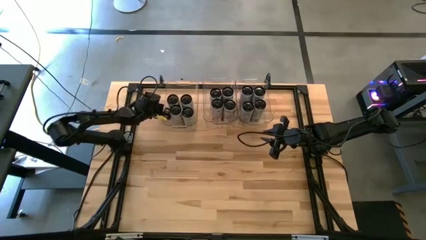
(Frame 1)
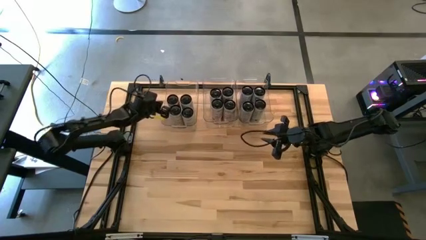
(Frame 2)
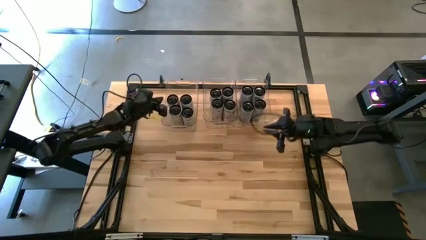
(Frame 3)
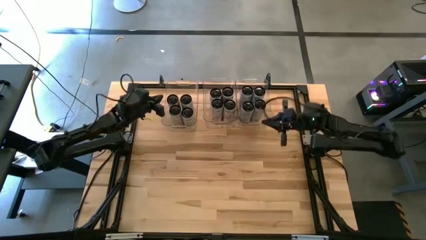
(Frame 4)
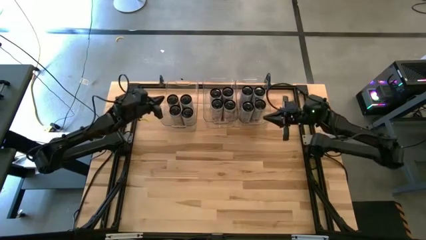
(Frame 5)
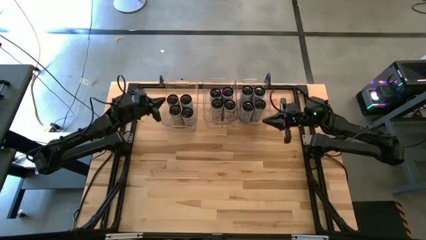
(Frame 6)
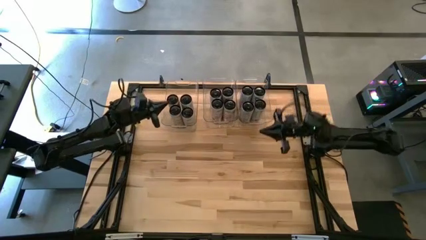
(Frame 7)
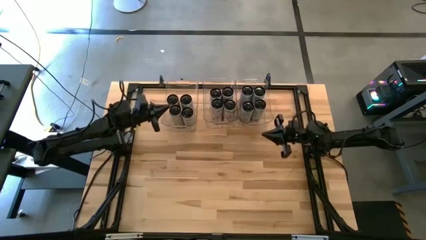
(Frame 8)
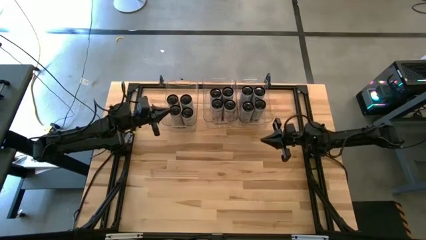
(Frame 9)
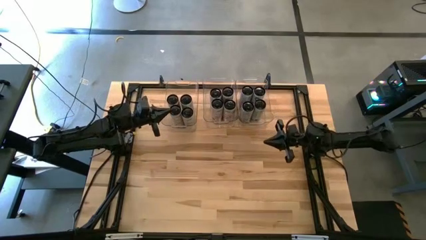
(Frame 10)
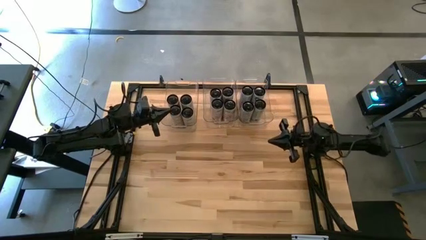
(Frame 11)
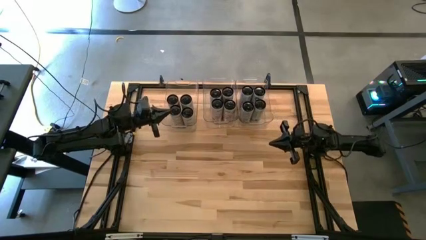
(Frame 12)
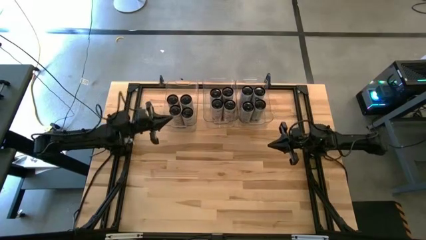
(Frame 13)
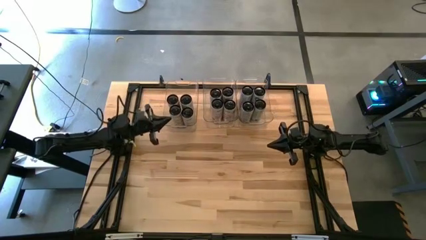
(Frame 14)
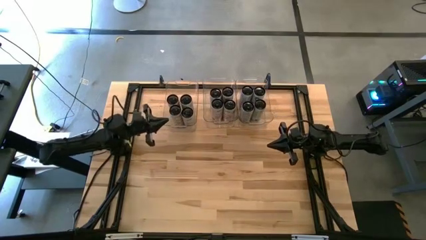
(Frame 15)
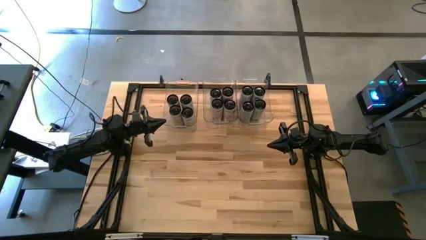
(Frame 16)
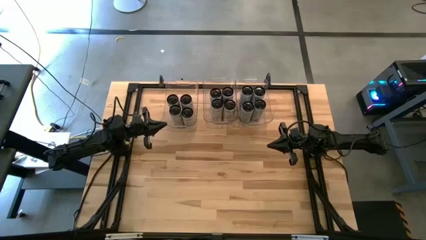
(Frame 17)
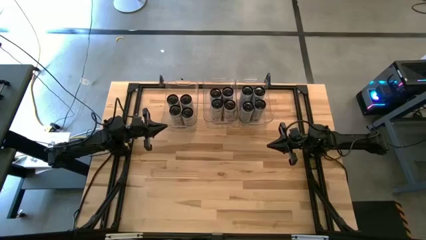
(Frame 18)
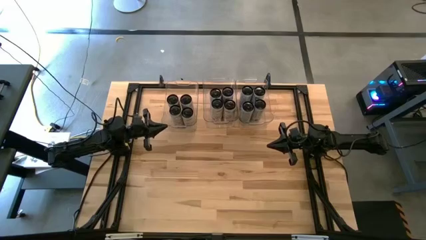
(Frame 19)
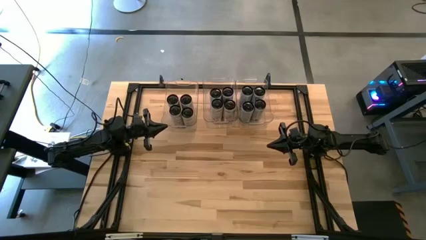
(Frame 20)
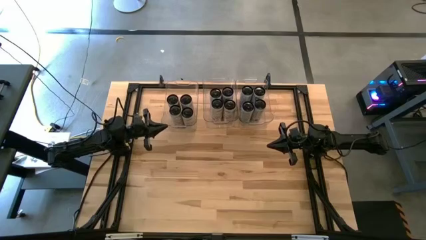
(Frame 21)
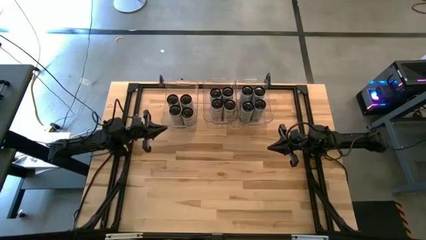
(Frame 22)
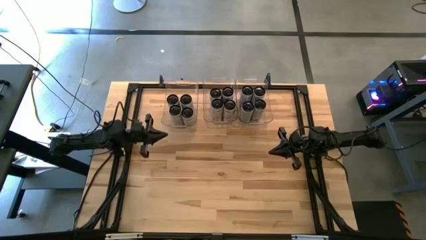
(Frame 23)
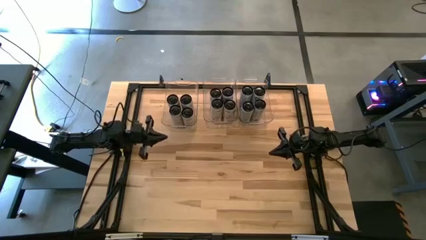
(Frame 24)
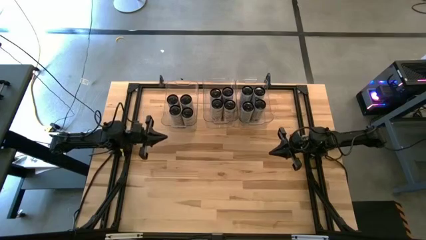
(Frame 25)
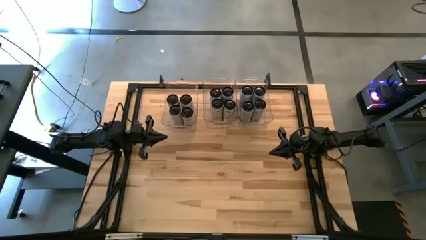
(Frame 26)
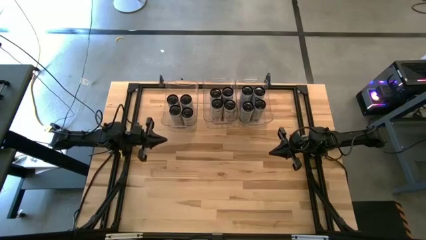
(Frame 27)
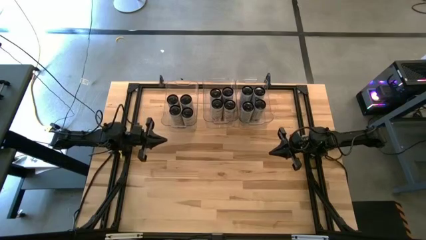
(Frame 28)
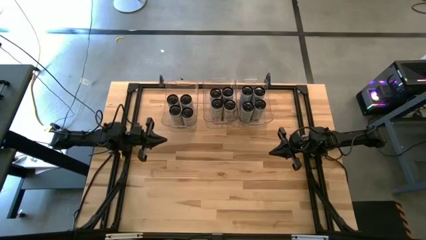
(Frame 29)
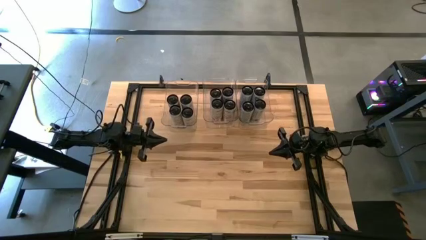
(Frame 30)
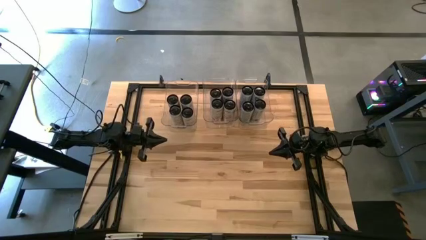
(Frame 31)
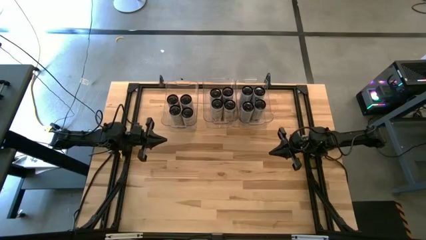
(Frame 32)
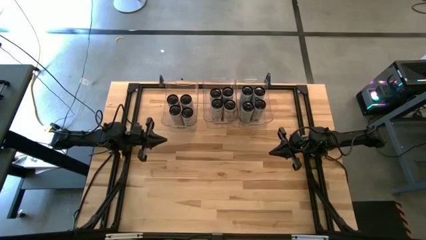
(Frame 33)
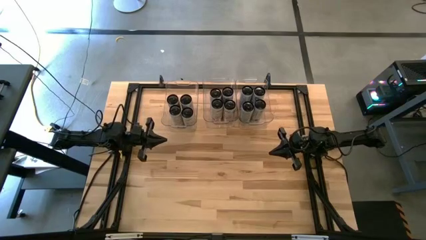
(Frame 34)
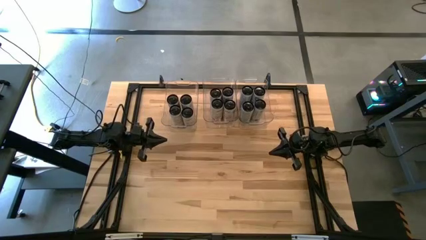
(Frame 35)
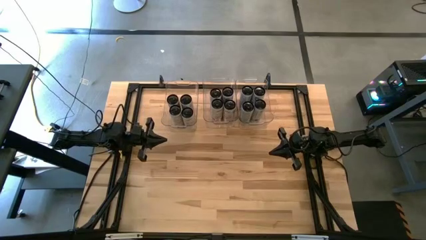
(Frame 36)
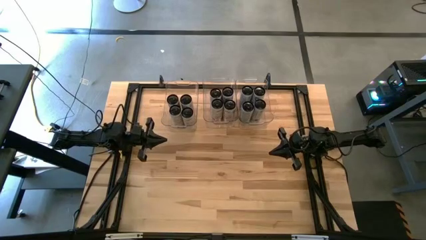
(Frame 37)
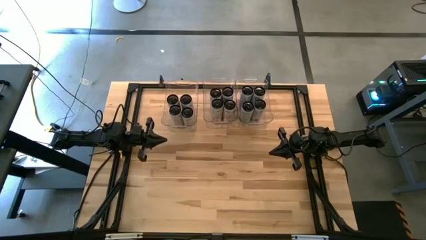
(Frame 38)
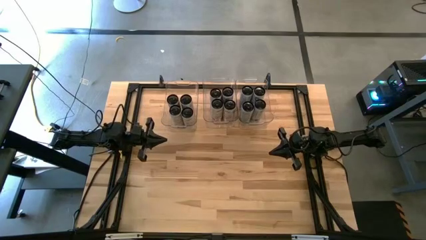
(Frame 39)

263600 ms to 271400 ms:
Task: Sort soda cans
Return to Home Position

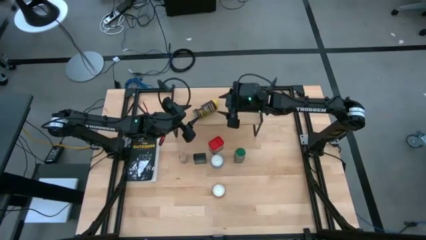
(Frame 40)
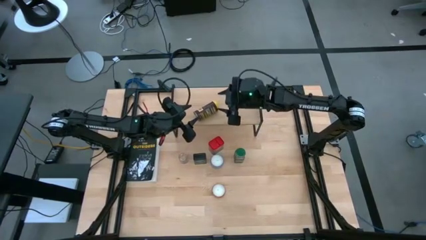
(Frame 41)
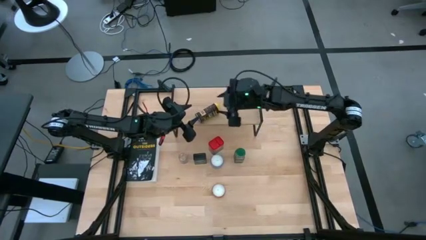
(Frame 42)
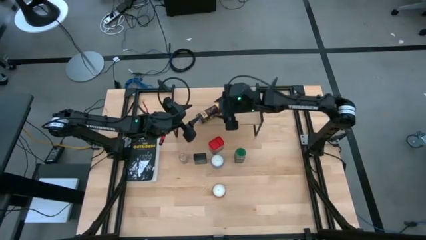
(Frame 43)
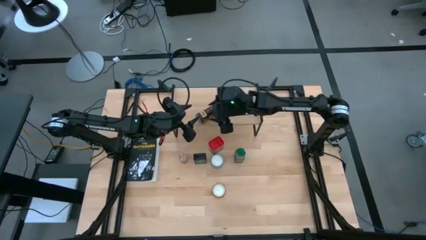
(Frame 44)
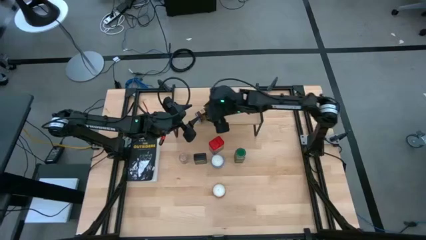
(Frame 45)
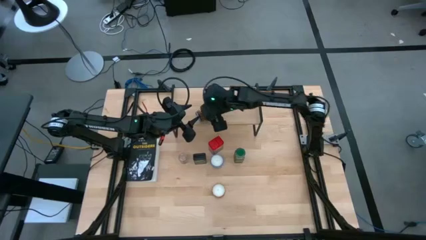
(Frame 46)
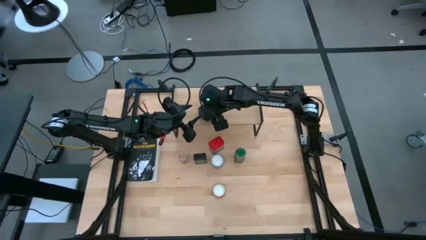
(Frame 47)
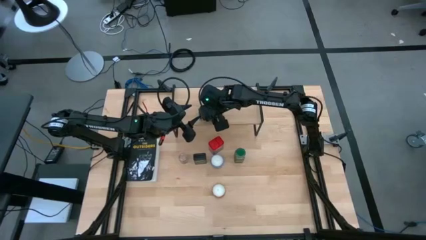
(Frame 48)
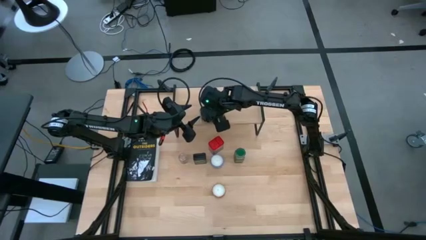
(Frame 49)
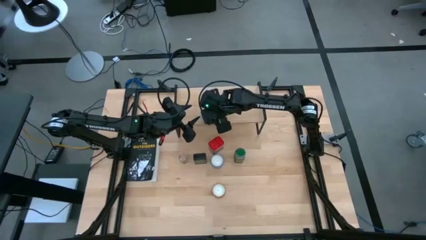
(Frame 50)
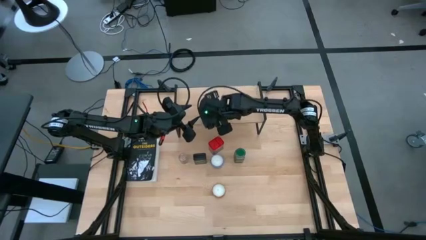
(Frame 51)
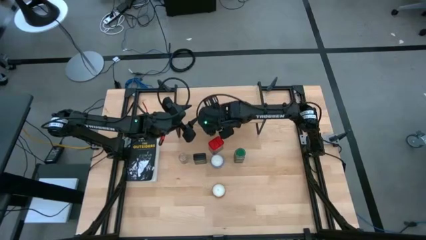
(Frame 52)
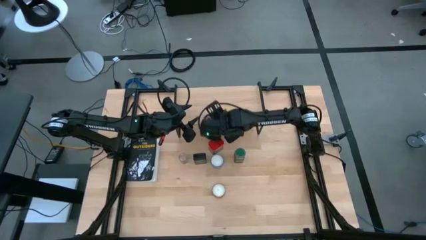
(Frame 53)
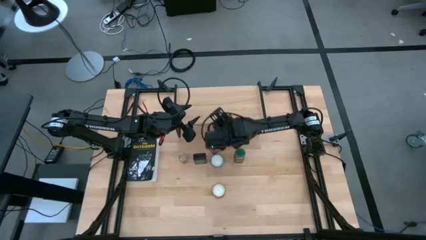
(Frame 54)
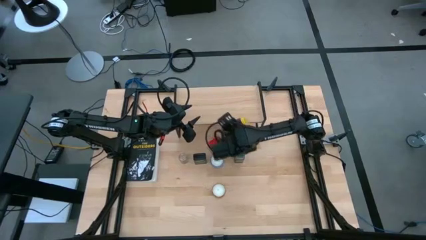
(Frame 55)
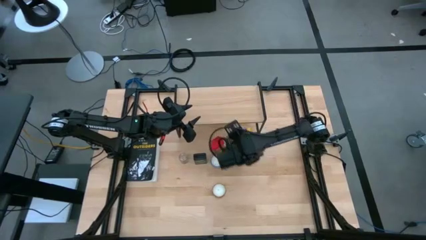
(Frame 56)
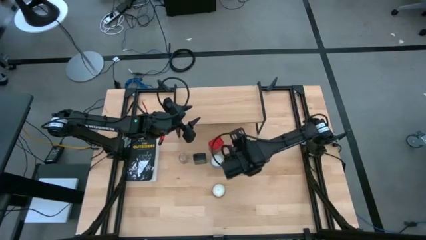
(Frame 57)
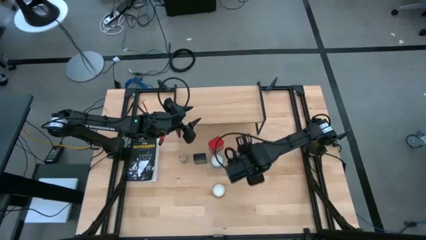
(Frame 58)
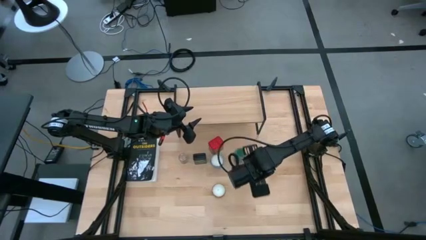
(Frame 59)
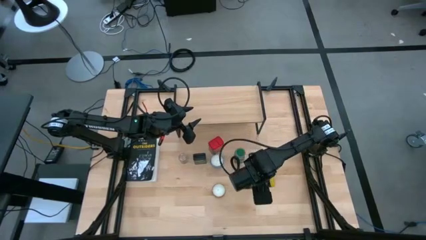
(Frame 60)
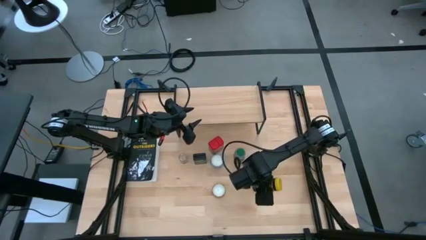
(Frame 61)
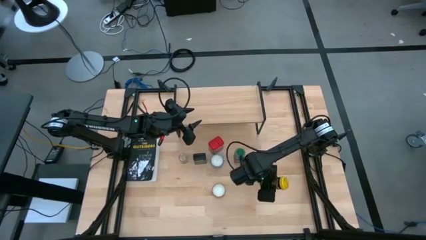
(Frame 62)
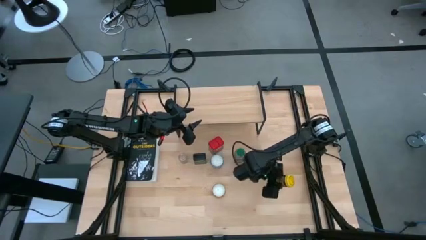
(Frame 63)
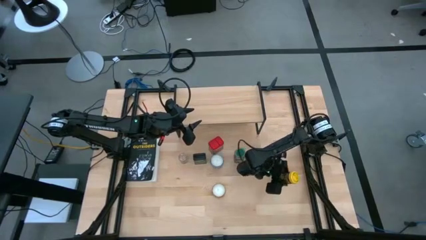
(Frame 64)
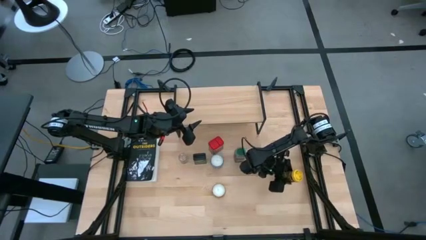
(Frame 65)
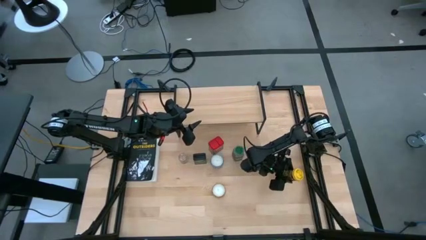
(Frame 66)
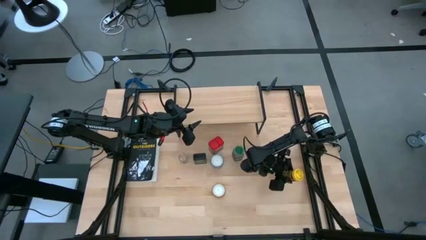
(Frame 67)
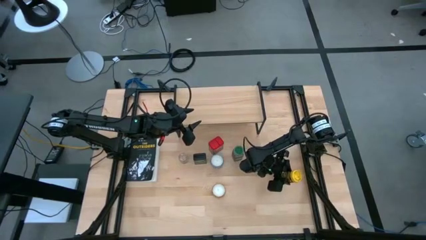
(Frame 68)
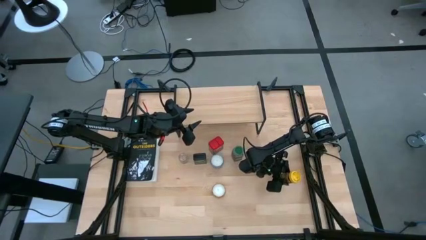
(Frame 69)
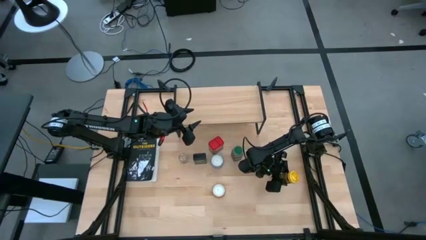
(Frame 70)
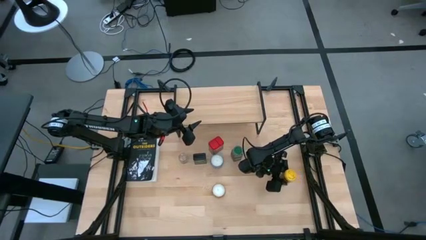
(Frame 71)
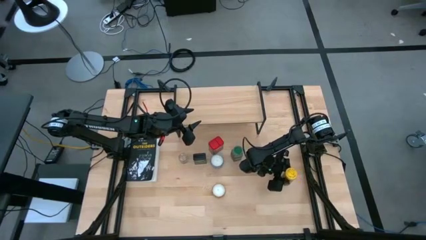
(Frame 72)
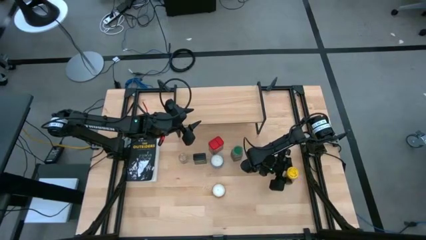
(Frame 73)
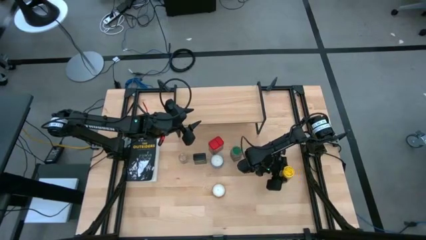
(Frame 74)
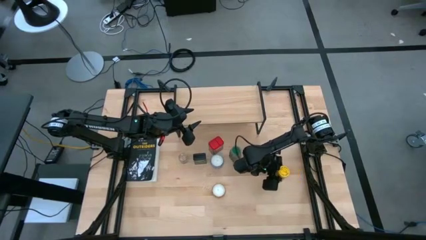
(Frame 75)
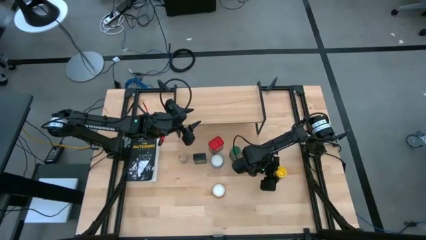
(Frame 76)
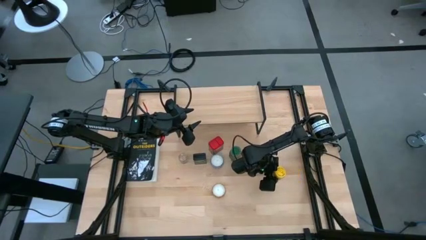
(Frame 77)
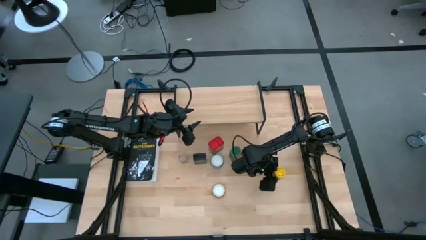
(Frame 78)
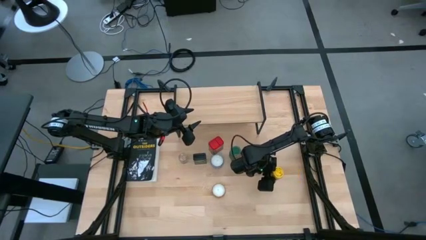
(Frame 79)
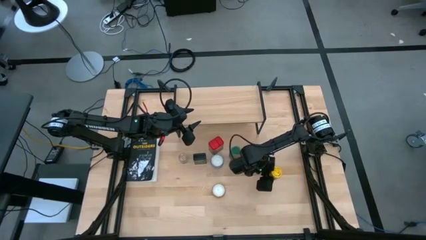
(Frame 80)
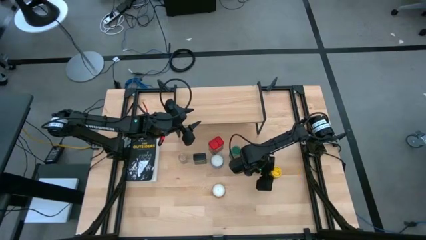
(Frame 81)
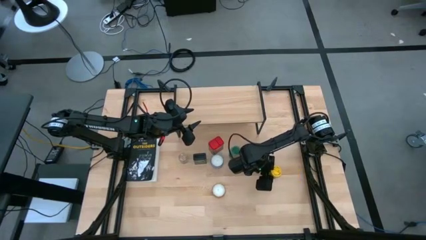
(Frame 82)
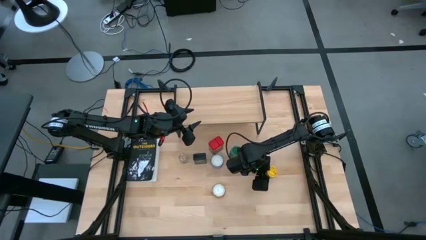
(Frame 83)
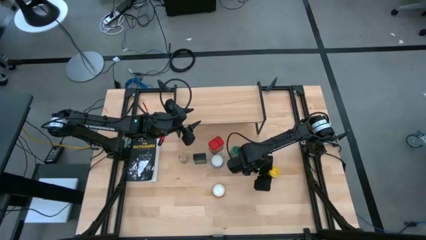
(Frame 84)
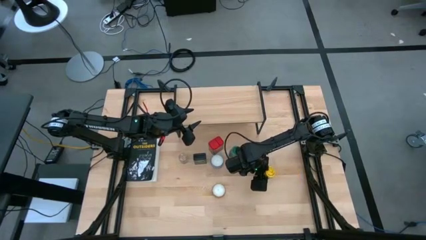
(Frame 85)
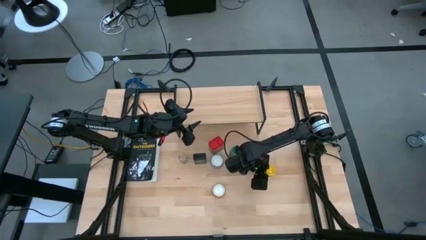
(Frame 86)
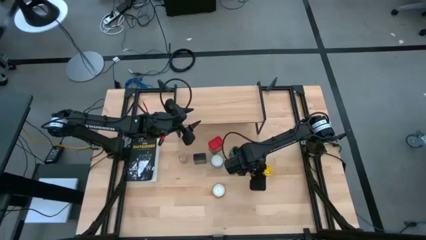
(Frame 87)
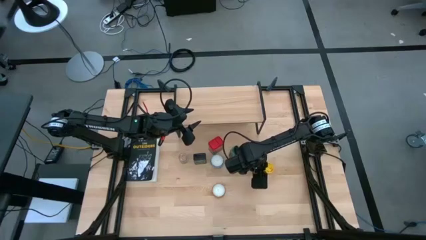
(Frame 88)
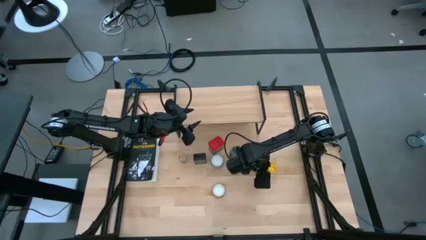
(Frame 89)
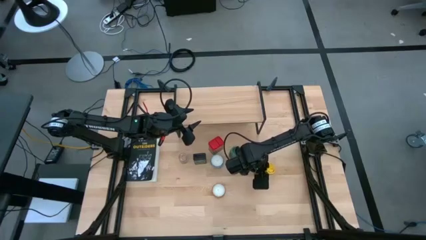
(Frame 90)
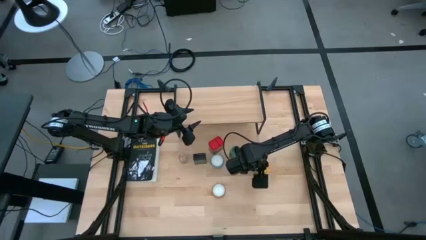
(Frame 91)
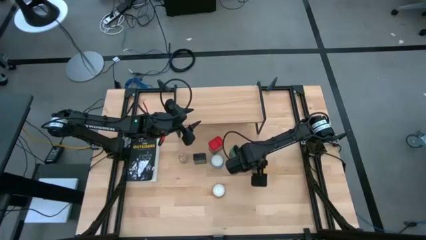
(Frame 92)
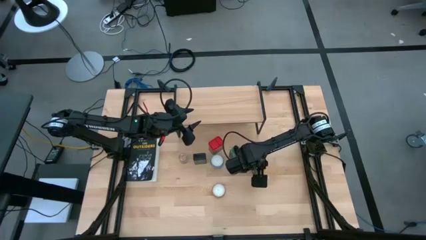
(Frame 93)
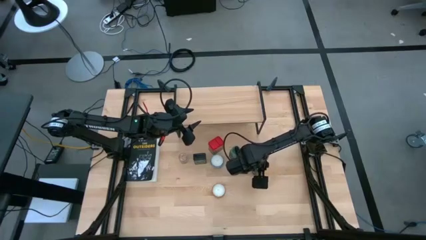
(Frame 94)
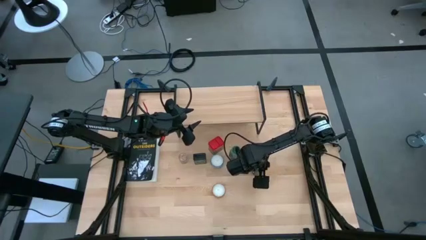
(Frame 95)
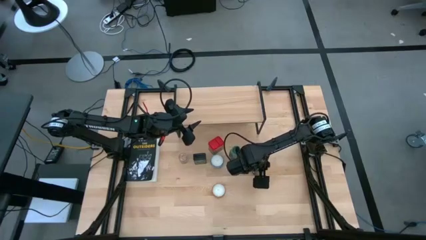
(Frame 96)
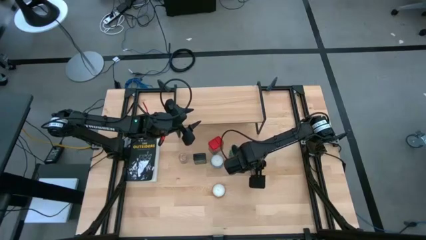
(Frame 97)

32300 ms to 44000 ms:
Task: Shelf spices
Remove the yellow seasoning bottle from the shelf
